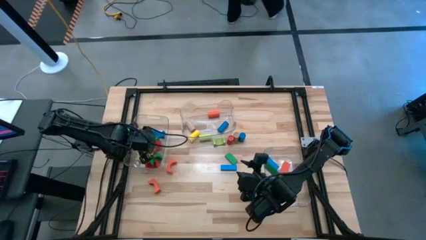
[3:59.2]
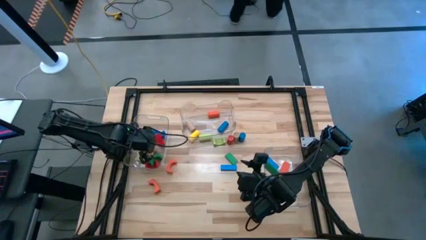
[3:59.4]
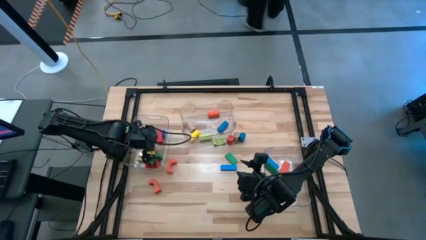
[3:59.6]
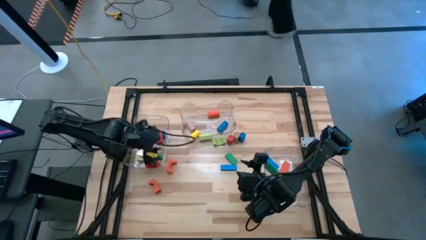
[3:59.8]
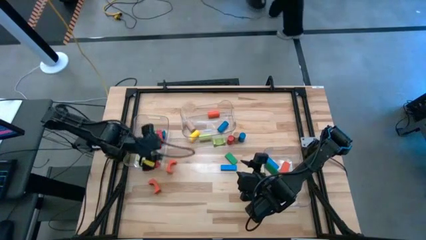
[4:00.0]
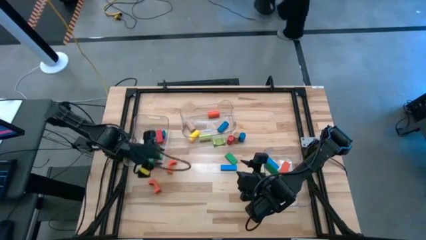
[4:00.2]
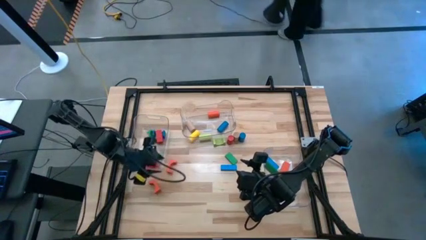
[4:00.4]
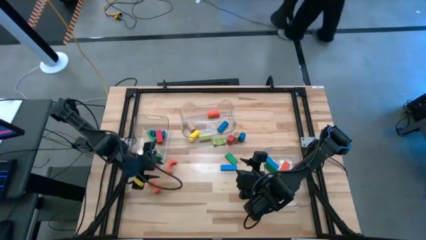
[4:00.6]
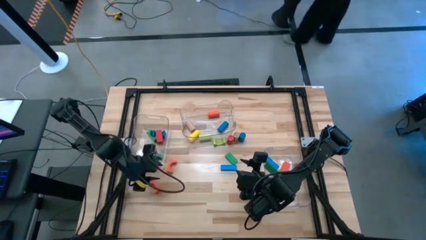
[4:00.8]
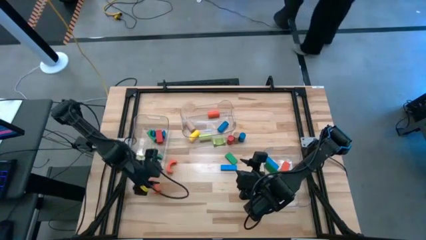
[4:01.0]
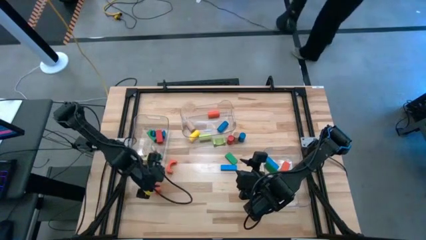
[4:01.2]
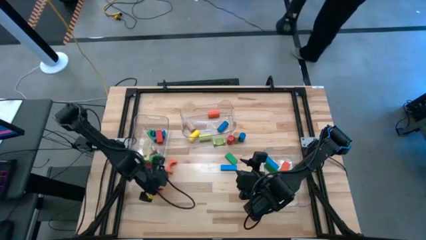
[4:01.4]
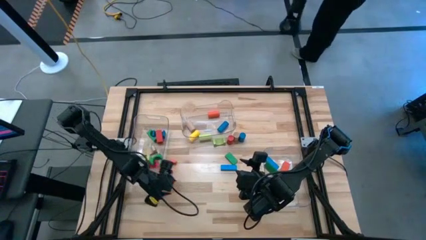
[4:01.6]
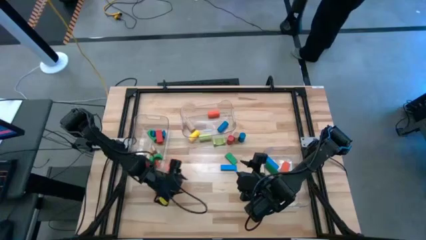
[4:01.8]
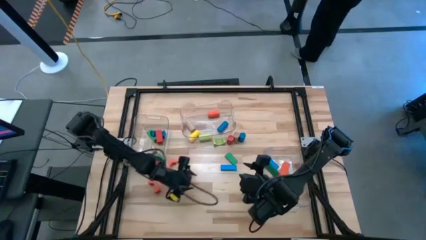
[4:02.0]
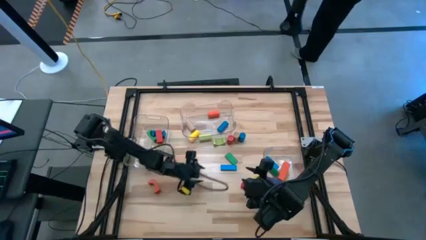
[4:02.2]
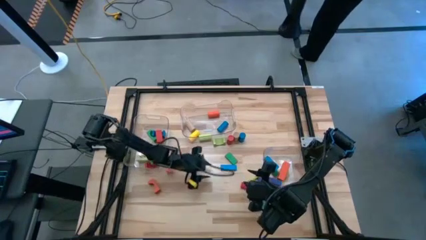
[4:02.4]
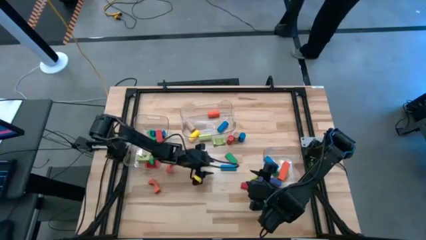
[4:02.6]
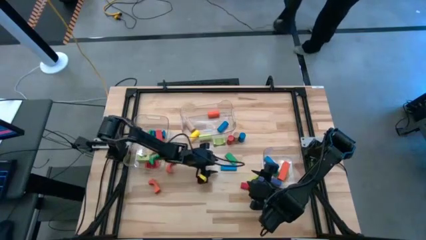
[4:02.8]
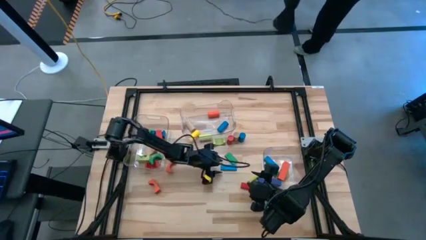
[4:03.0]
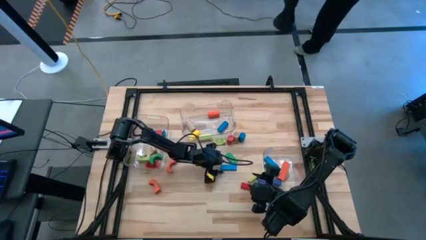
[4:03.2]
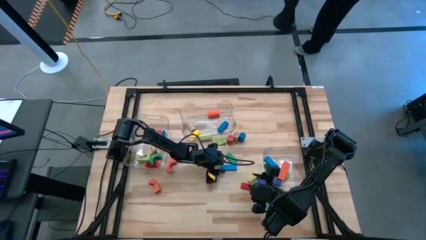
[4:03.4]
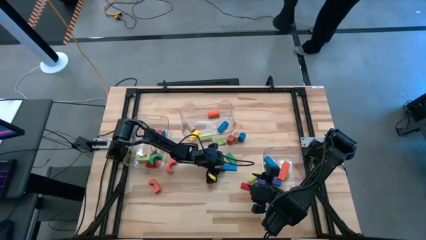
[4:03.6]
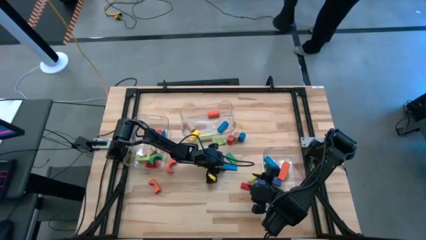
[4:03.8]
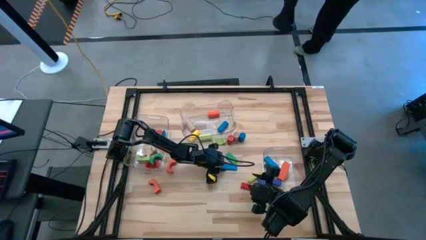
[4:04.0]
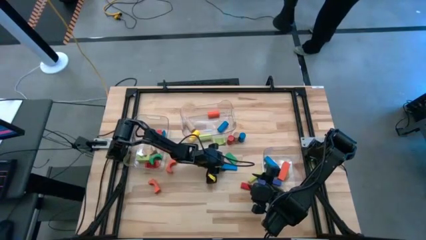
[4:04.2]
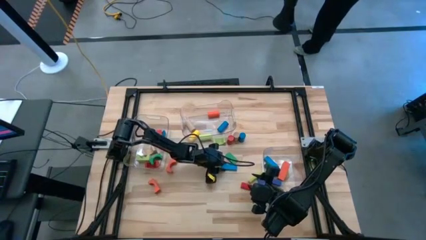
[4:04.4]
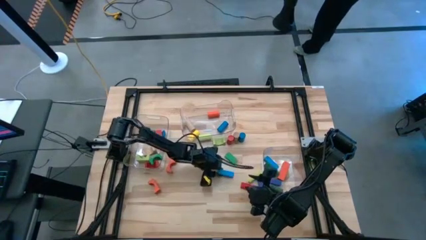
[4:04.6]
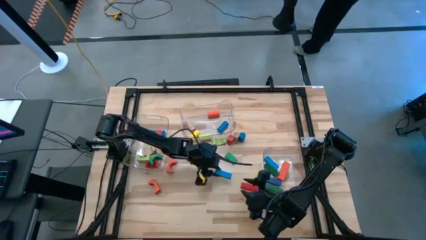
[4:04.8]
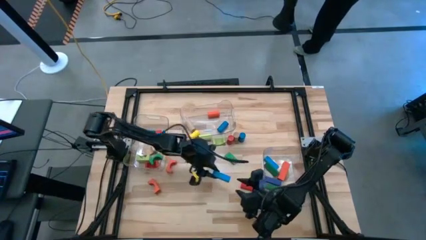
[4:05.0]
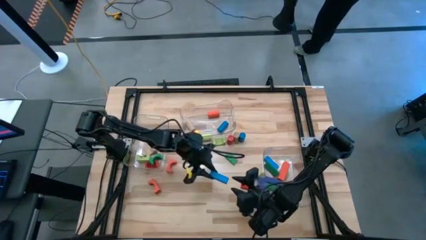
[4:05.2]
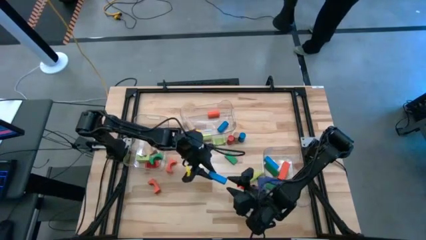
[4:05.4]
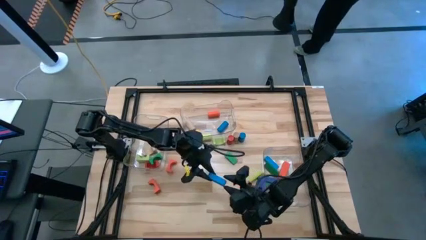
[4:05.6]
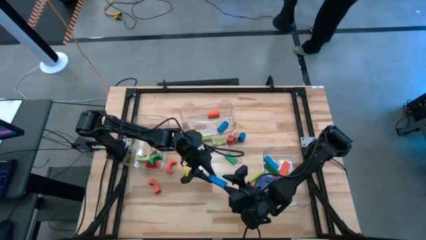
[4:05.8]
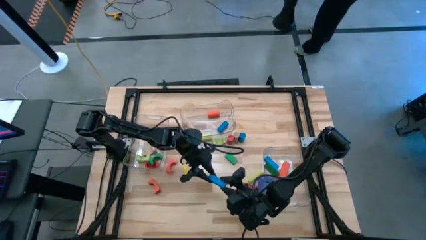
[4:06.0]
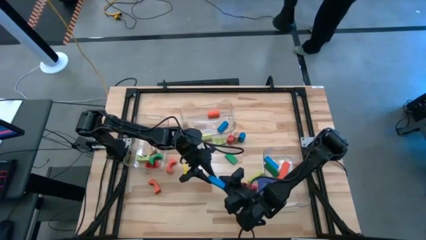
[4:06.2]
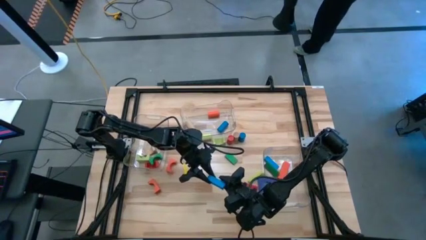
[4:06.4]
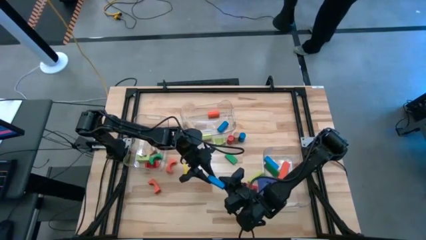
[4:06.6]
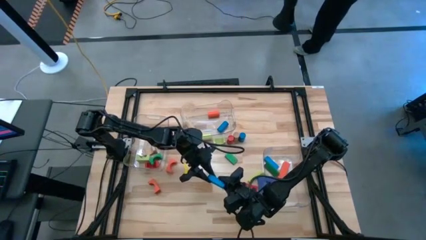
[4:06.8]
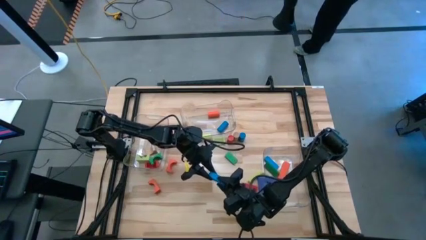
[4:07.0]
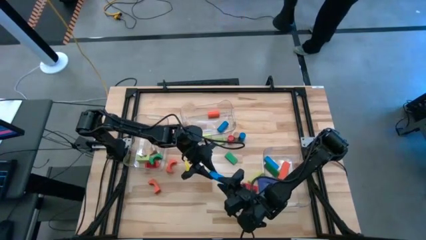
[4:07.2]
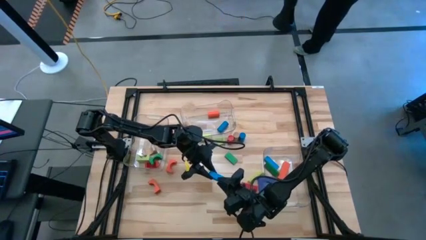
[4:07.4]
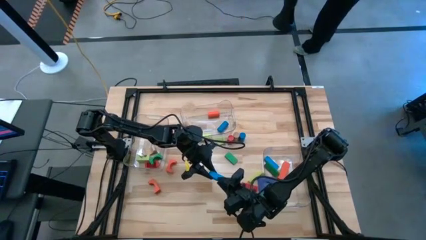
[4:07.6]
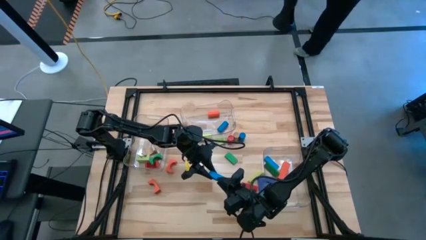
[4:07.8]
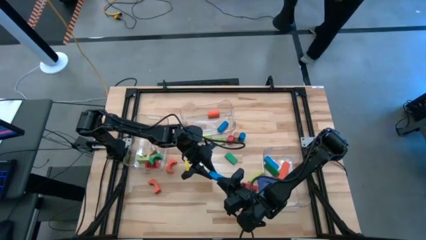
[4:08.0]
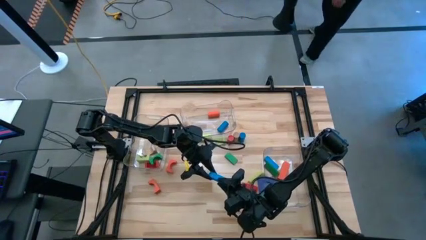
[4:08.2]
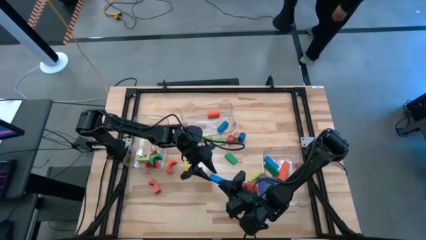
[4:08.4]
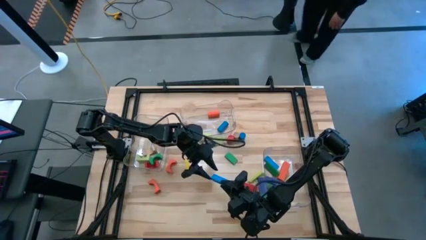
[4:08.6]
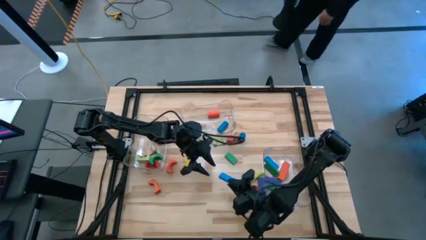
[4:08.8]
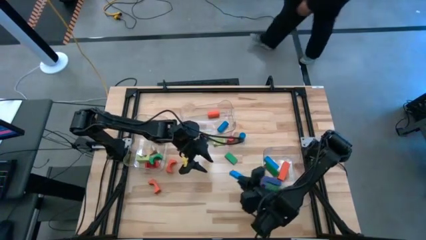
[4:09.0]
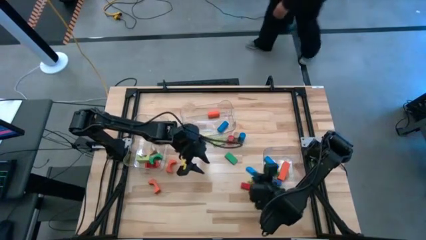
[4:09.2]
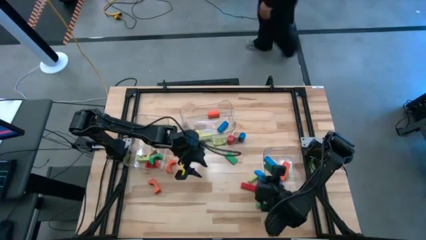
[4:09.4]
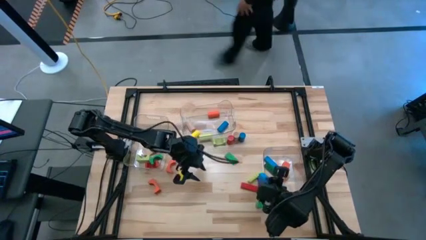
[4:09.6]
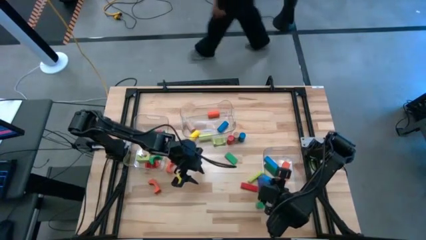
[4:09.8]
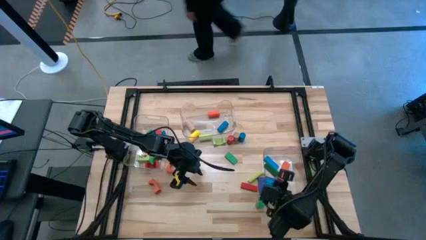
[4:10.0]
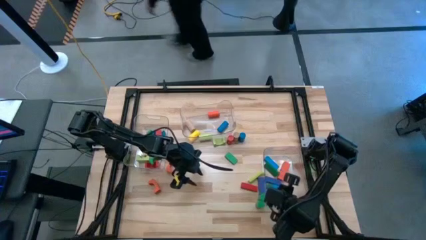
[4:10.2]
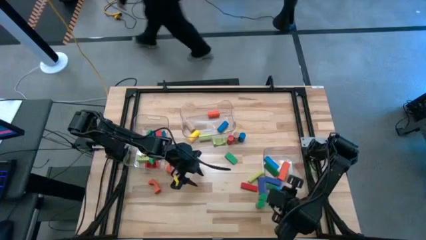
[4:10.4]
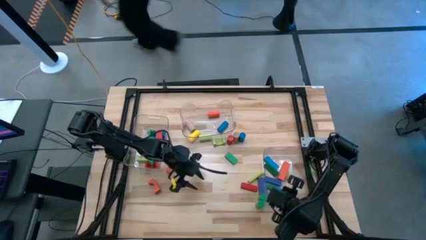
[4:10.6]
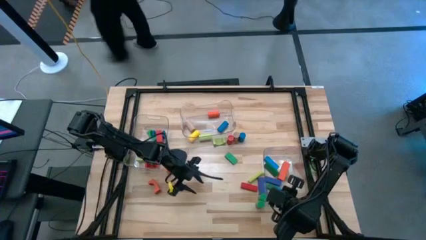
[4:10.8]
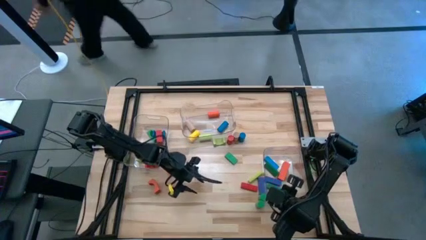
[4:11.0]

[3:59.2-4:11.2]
Task: Sort blocks by size
Put the blue rectangular block into the right transparent bin

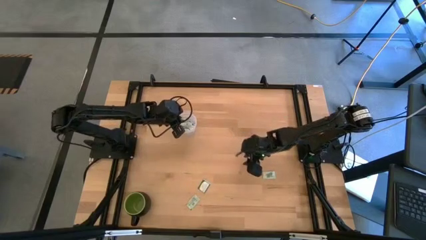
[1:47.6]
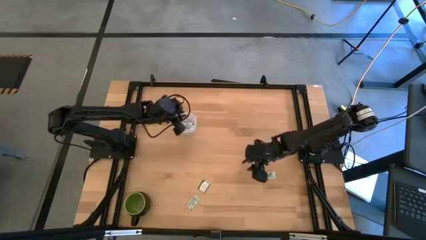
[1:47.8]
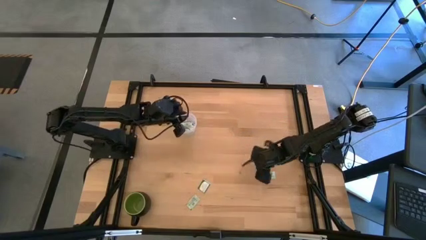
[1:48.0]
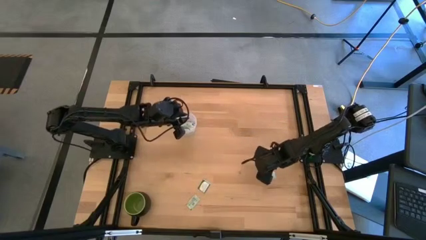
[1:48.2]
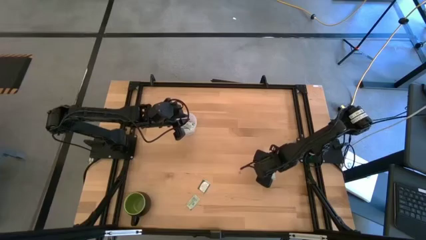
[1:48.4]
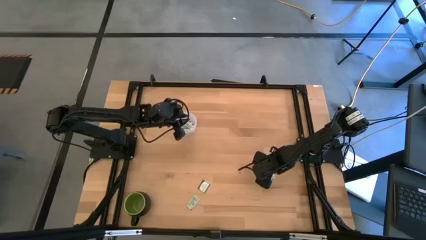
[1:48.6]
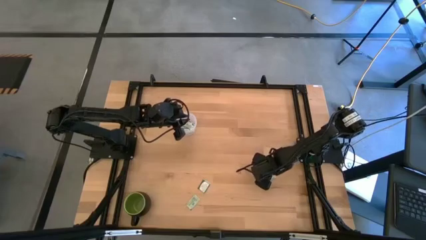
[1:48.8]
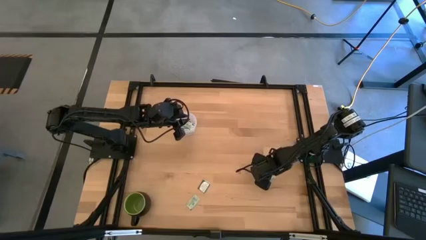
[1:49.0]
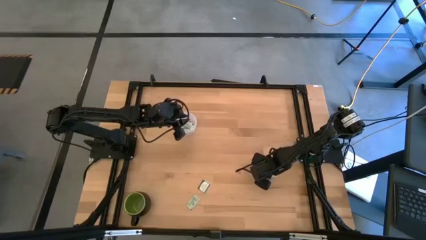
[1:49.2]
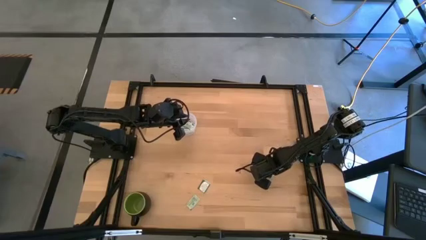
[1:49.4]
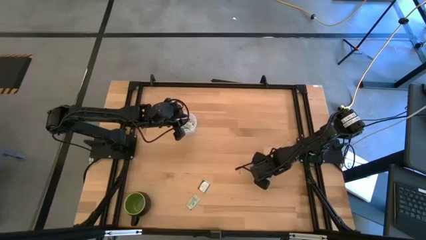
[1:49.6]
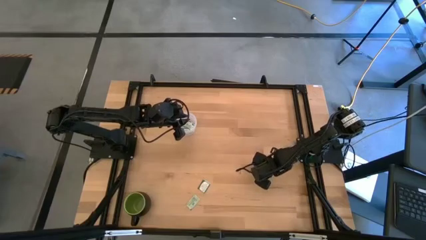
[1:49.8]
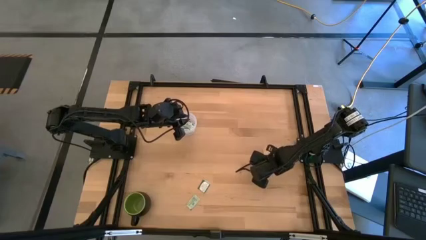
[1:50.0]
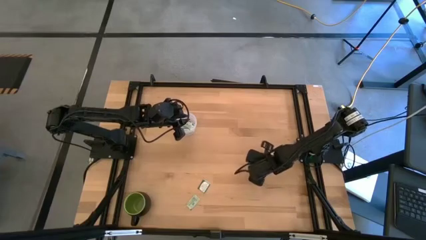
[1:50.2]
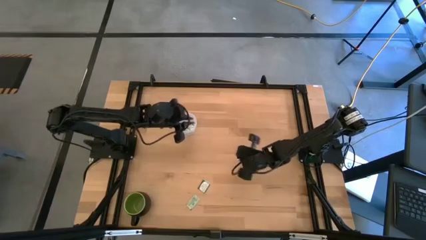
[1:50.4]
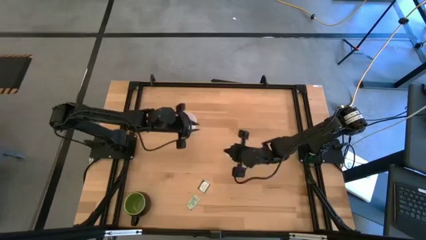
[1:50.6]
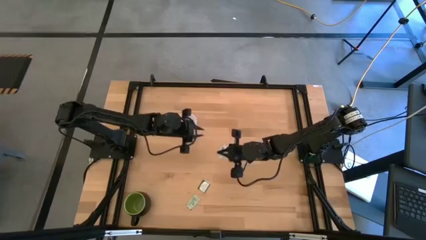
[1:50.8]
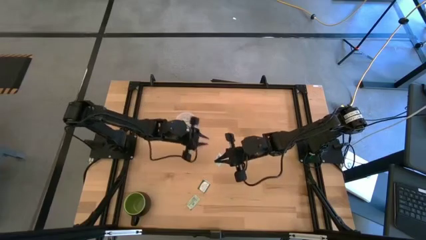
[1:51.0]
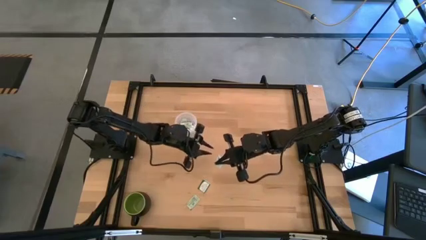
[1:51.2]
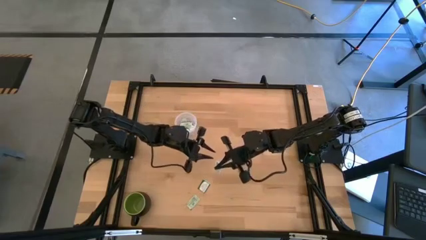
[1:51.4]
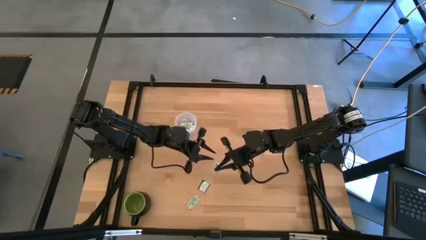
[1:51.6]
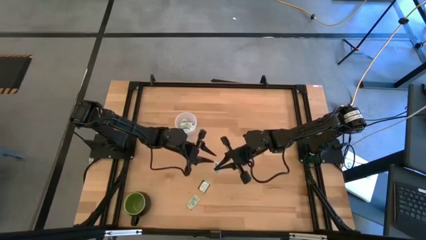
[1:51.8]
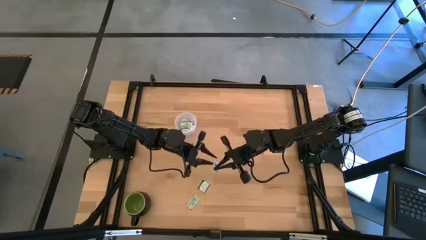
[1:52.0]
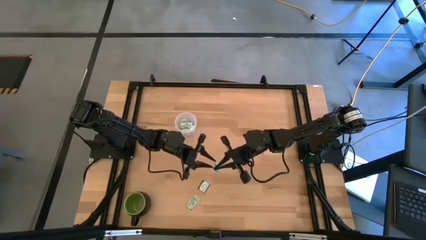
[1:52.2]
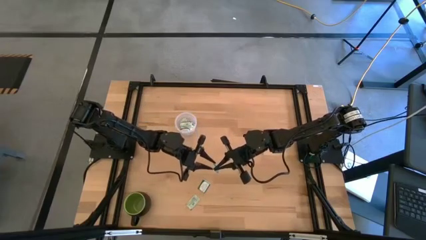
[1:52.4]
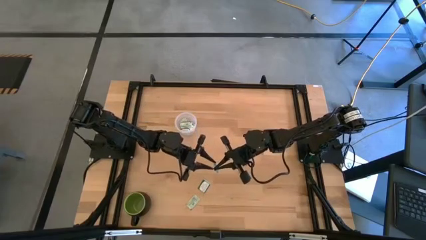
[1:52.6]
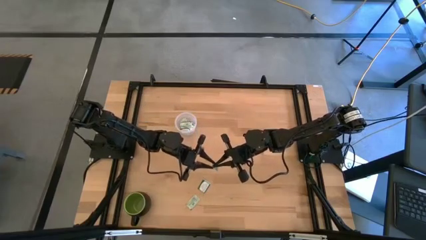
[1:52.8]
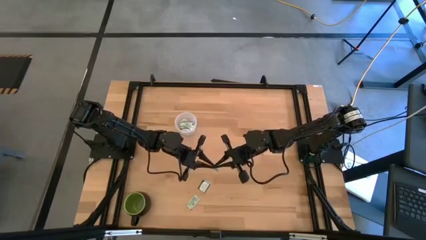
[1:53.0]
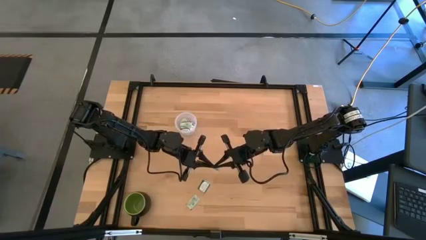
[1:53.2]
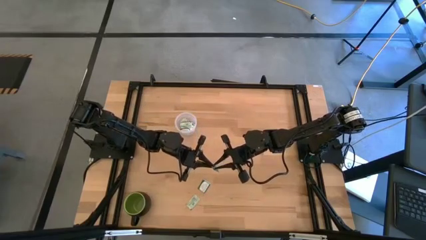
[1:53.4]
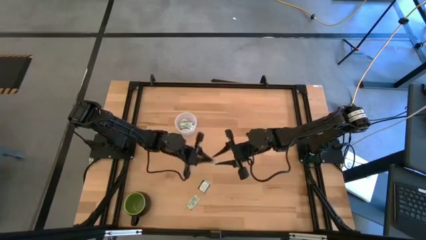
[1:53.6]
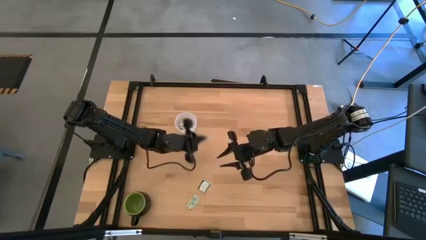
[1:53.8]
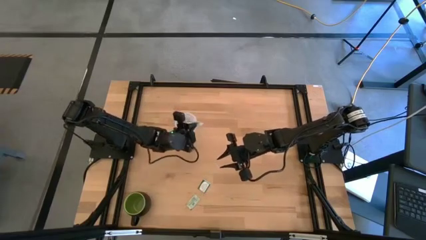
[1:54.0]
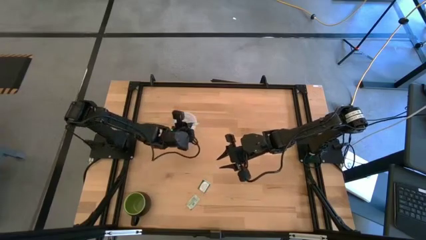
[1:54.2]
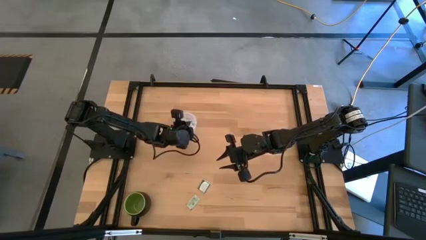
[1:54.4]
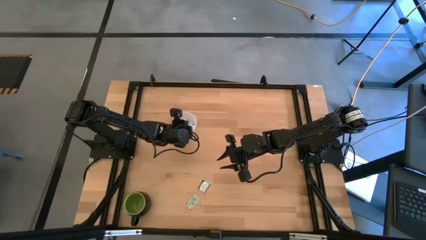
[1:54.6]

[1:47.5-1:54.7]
Task: Pick and place Stevia / Truvia into bins
Put the light green stevia packet into the transparent container
